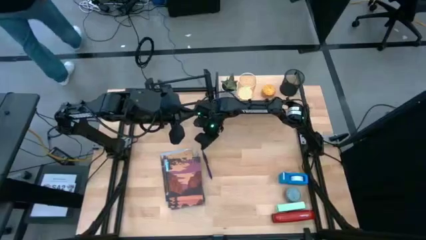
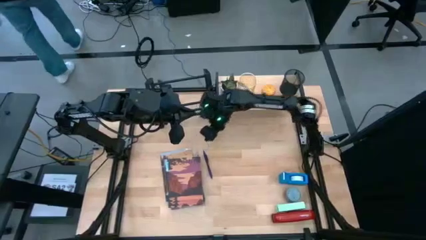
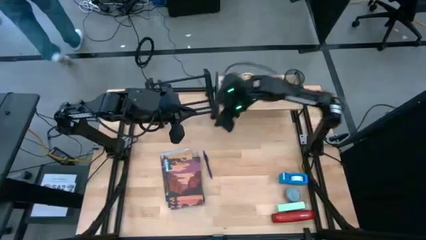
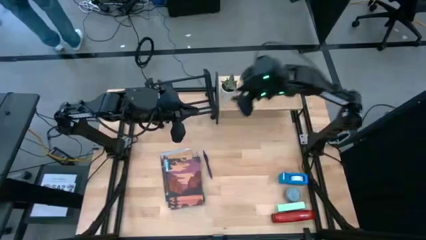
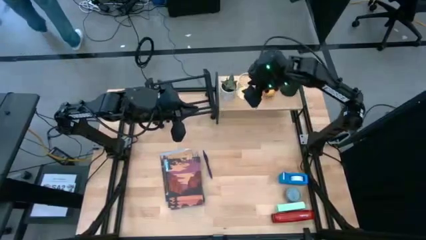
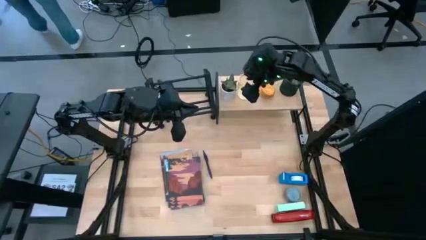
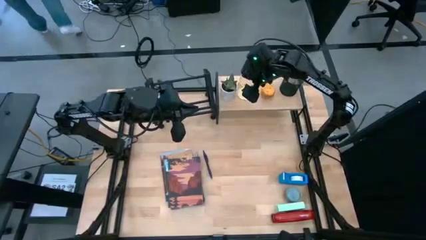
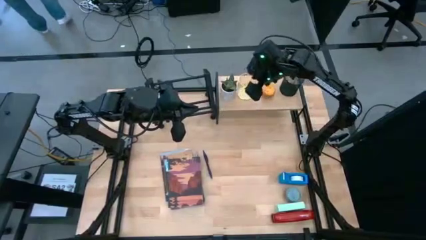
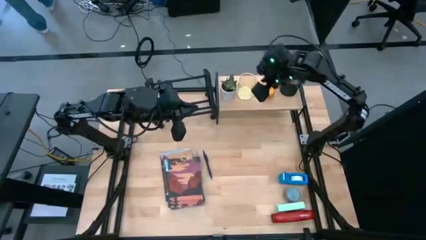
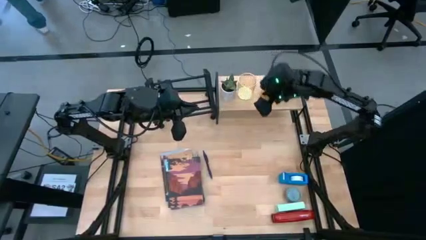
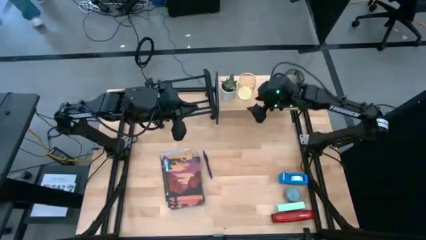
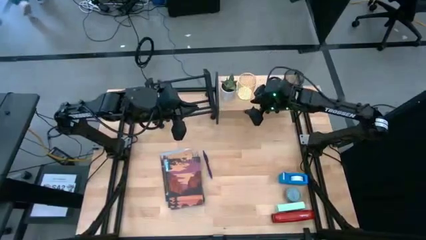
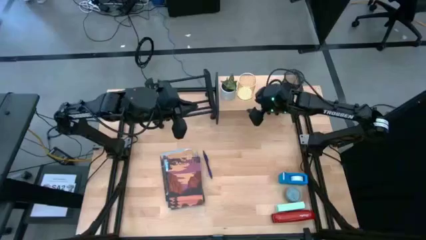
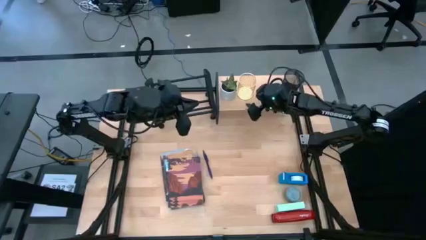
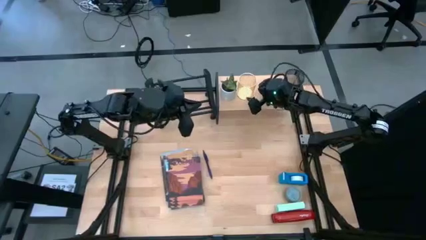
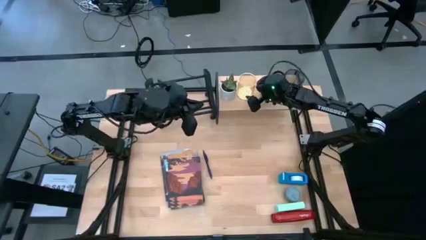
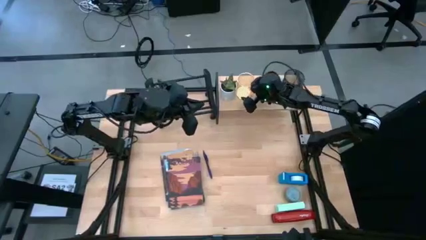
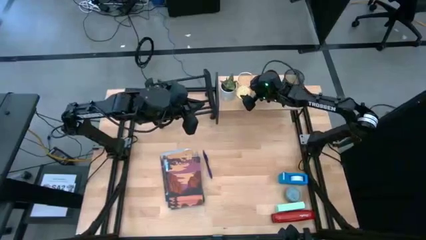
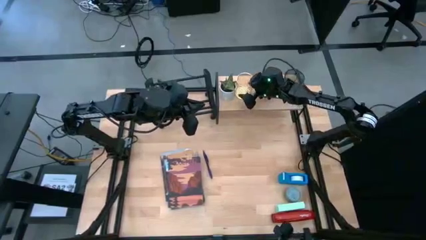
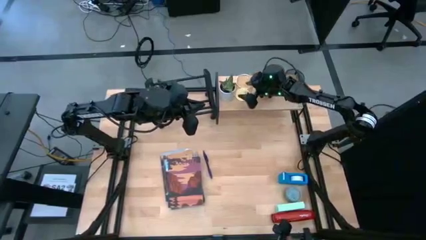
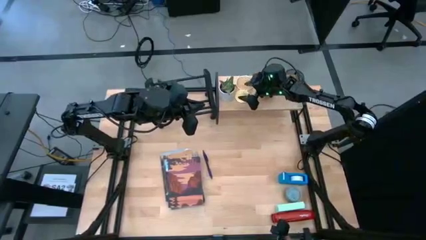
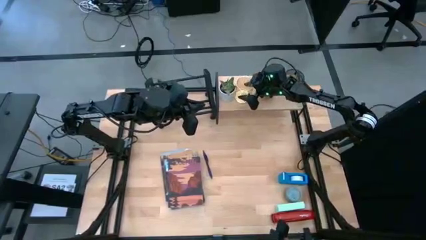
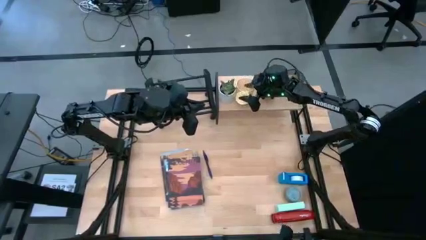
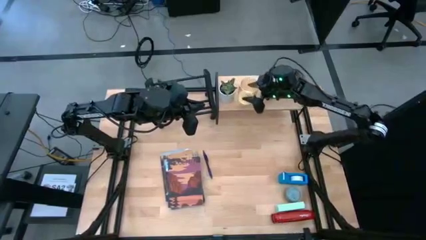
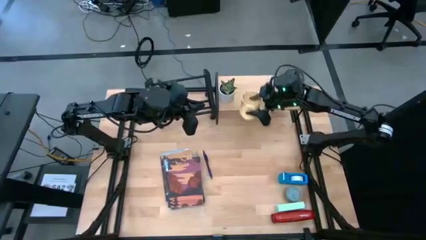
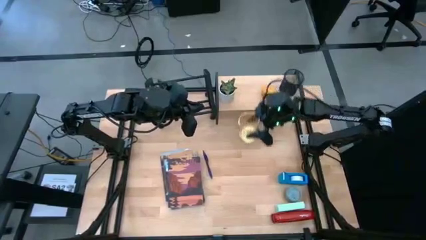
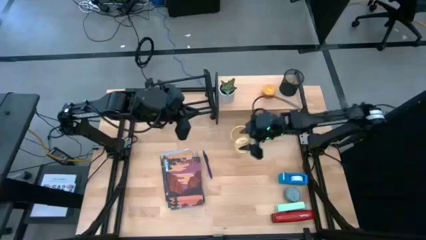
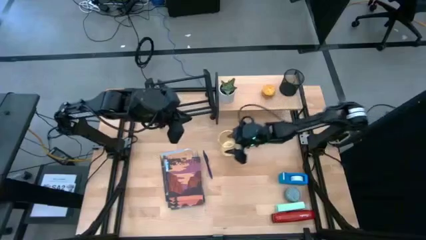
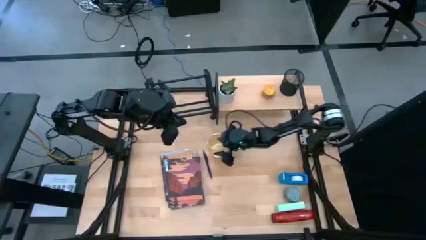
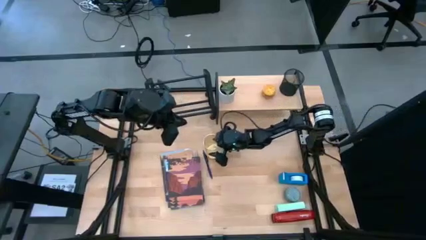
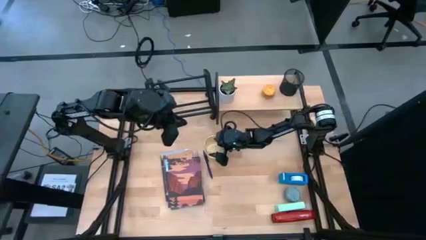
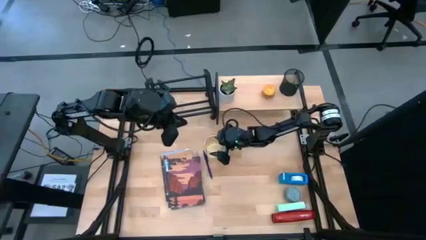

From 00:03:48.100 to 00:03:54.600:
Task: Stock shelves
Remove the yellow pen organizer from the shelf

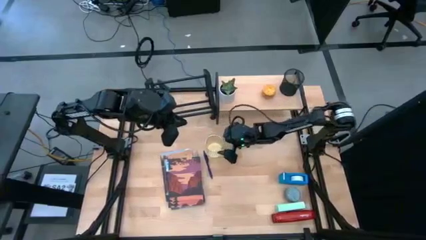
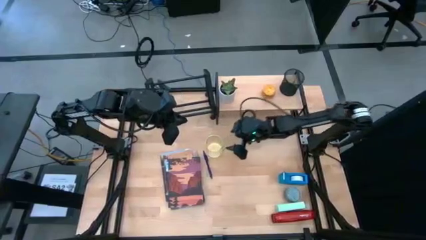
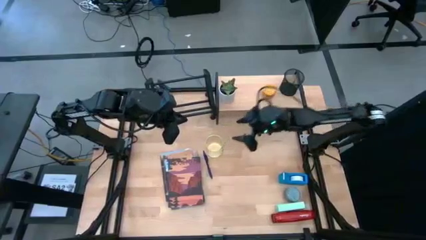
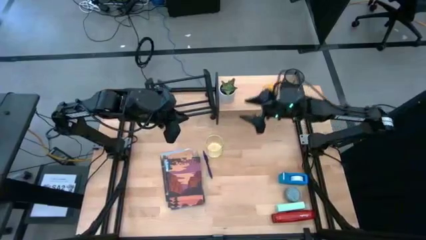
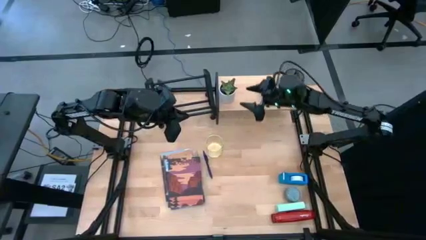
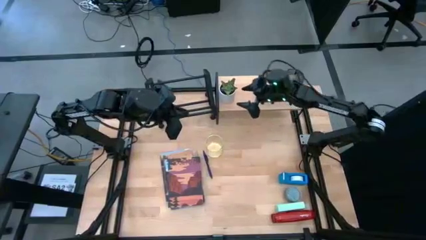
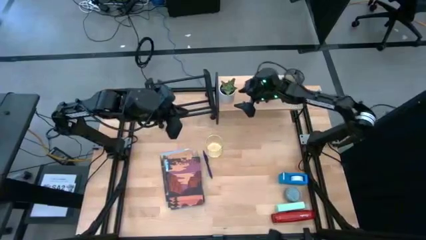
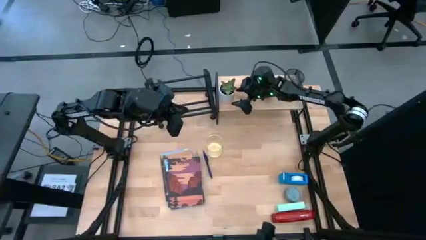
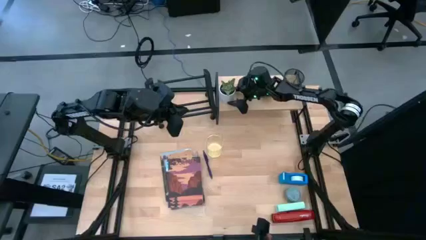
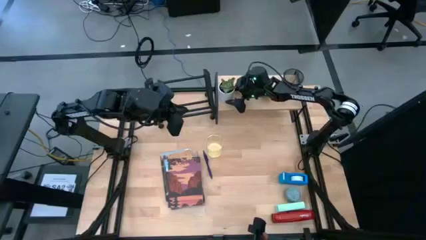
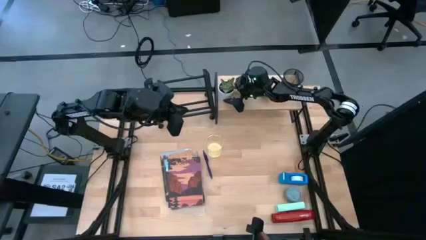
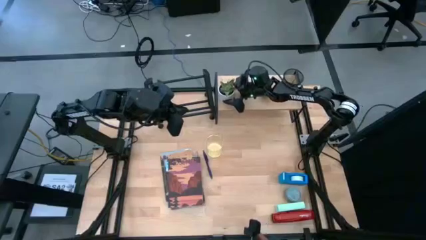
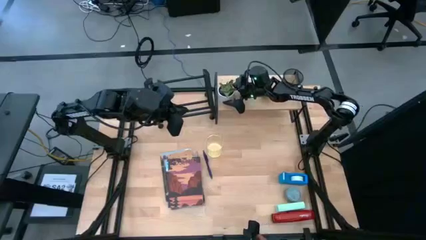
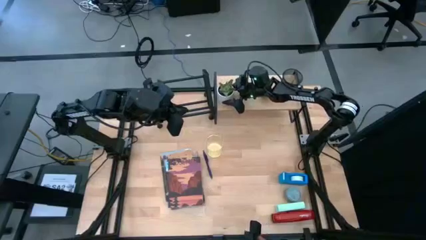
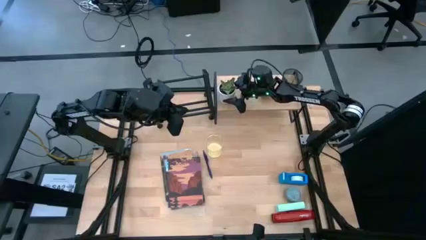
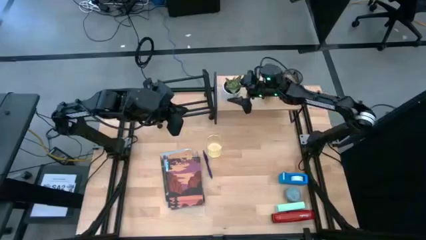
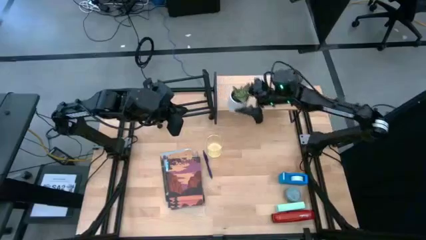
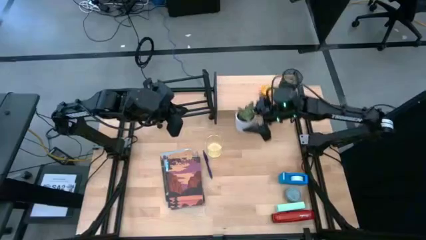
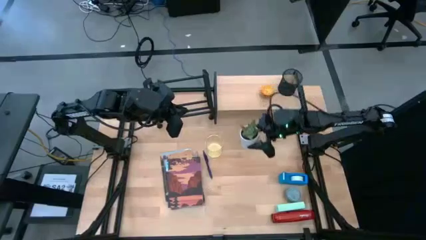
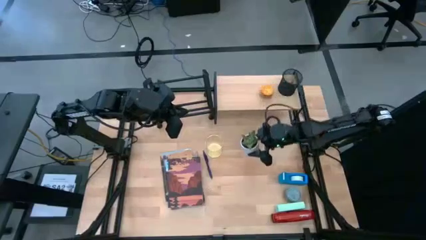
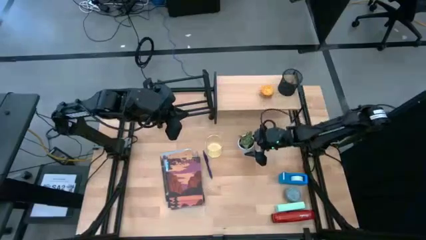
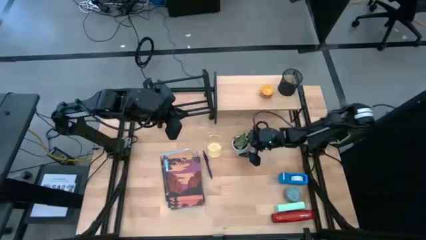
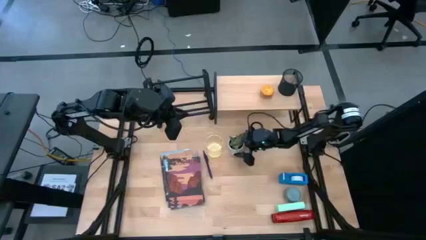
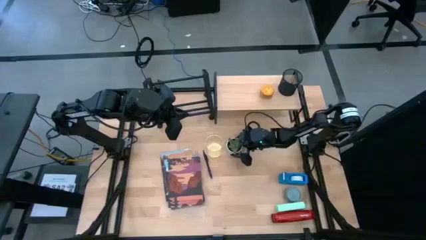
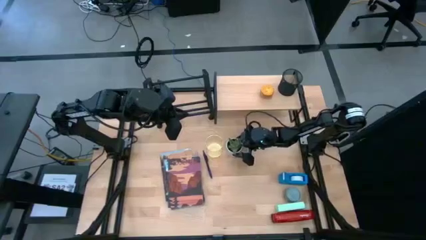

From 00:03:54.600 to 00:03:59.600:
Remove the white potted plant from the shelf

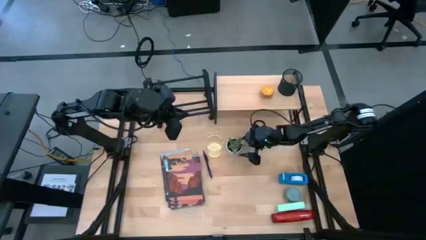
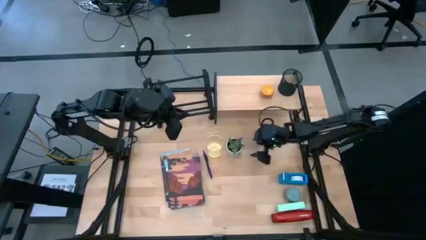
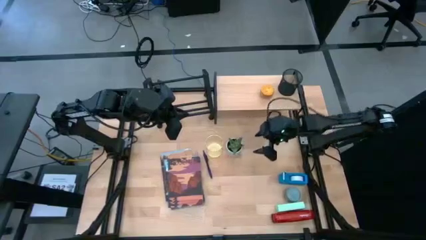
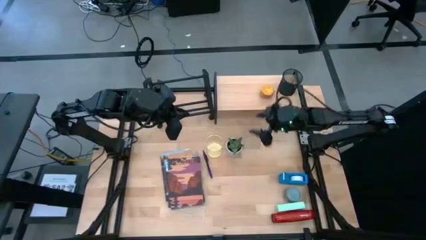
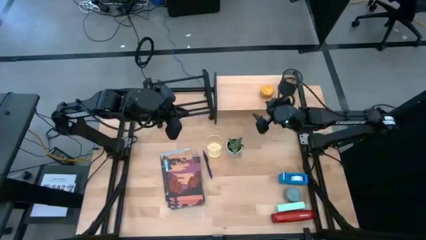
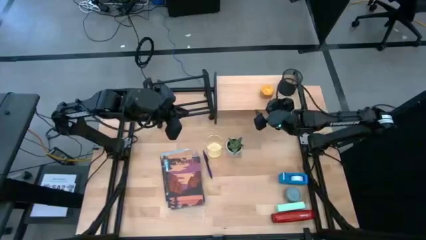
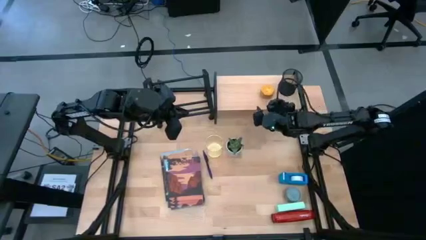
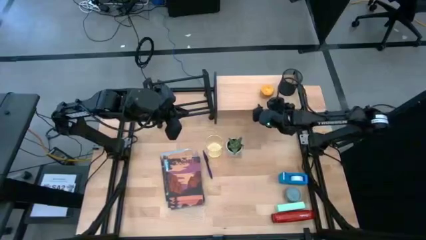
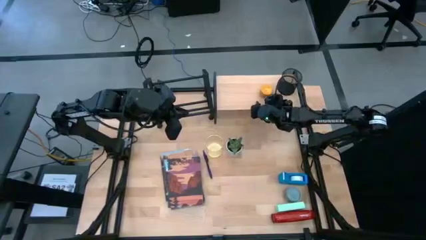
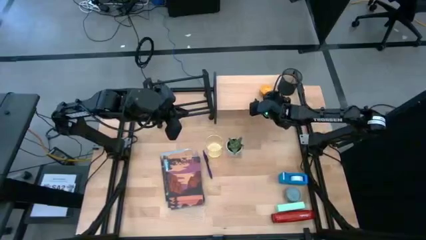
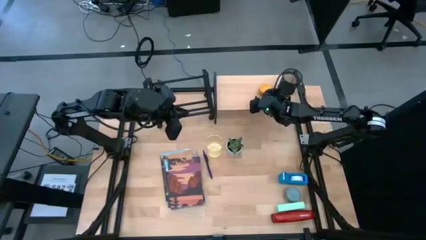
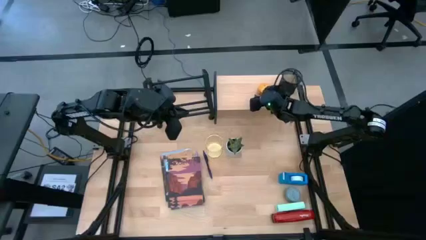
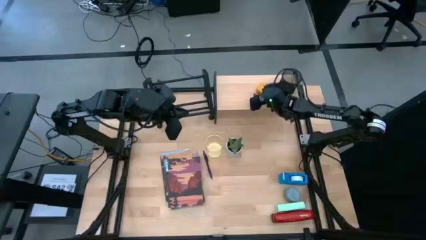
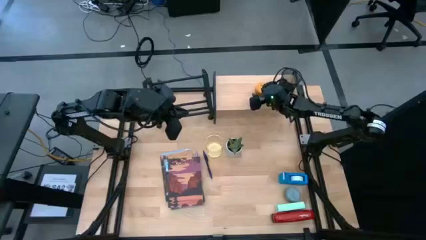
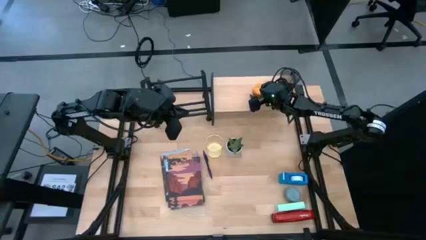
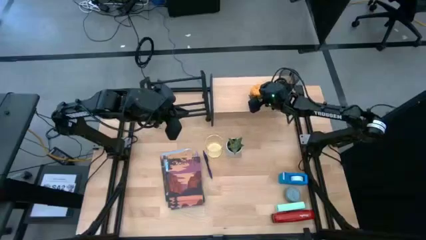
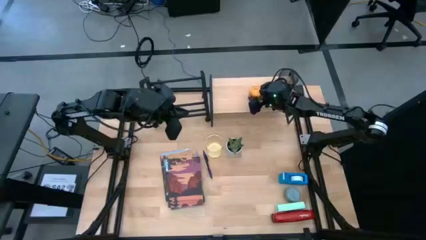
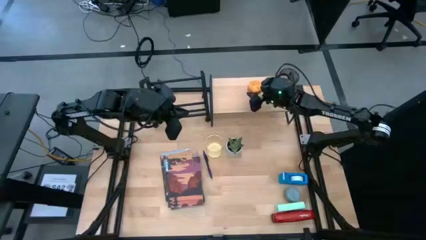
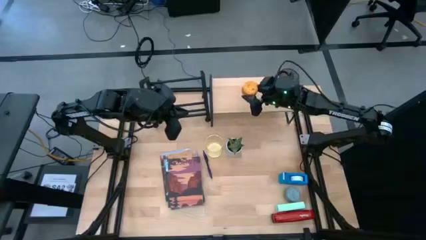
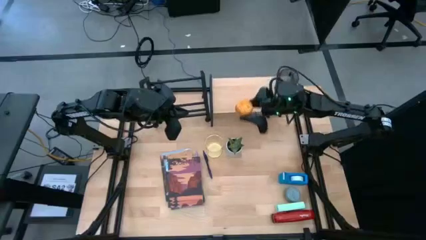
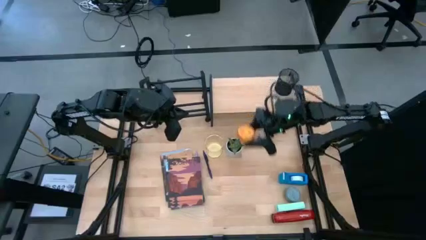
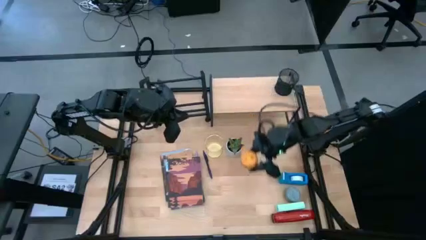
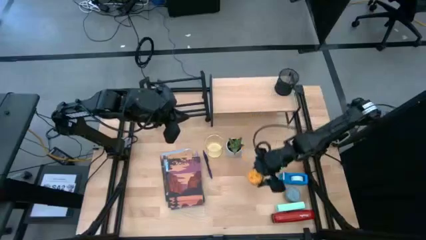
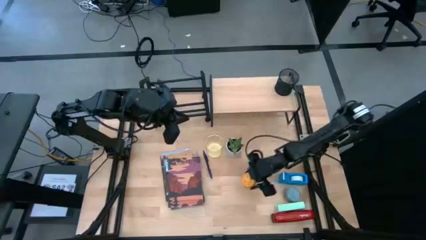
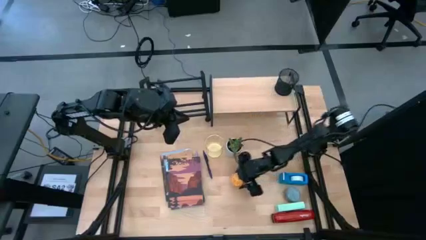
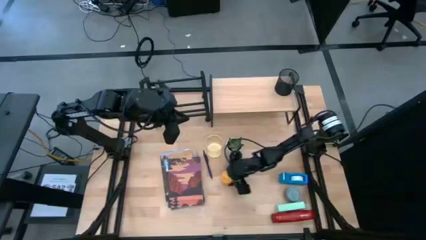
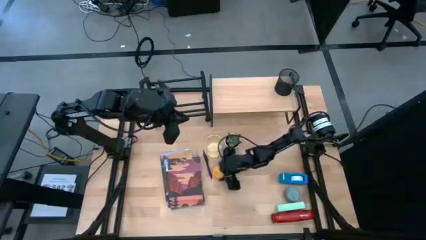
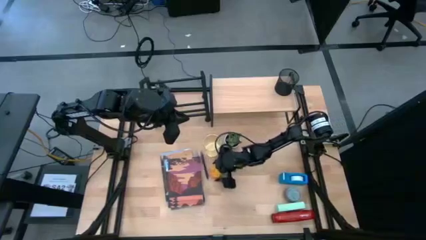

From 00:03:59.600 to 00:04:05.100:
Remove the yellow scented candle from the shelf

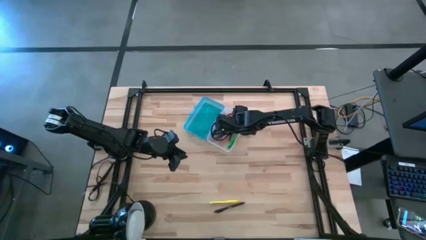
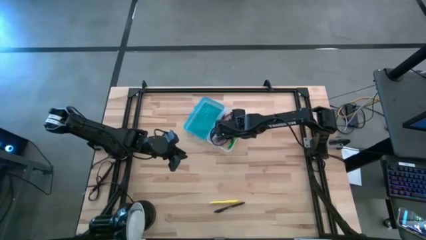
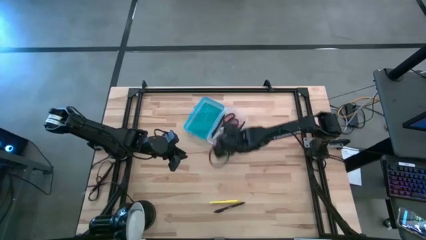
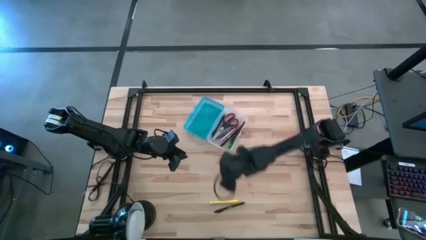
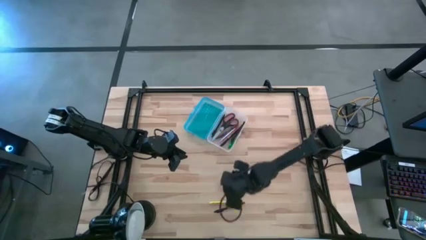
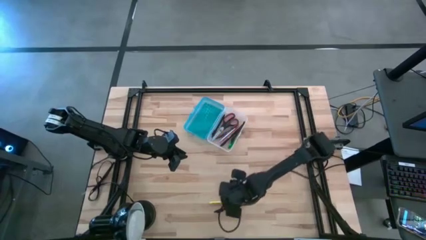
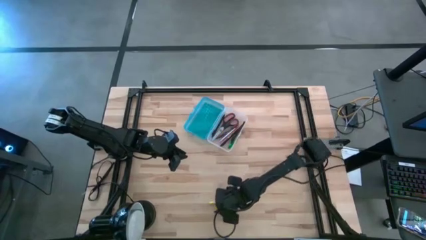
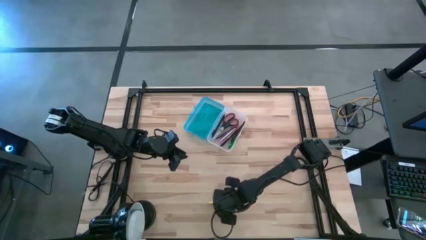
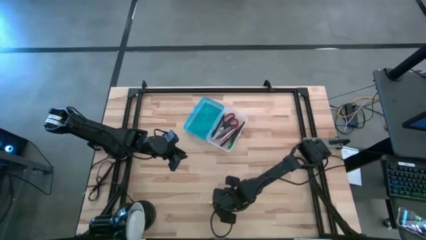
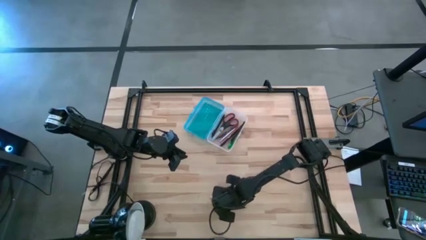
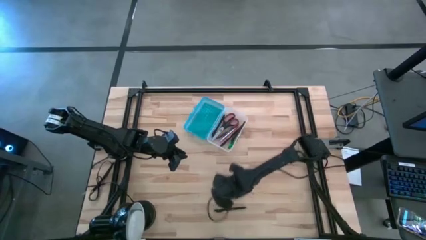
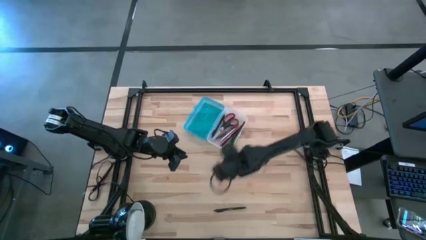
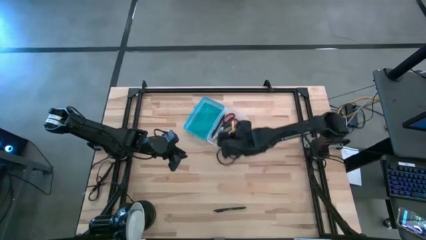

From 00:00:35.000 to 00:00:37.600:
Task: Pick & place school supplies into a supply box
Put the yellow pen into the blue supply box
